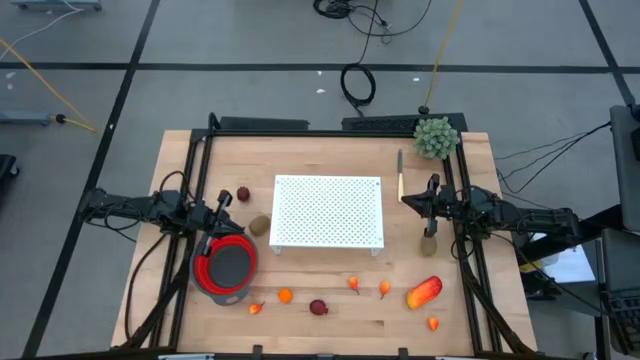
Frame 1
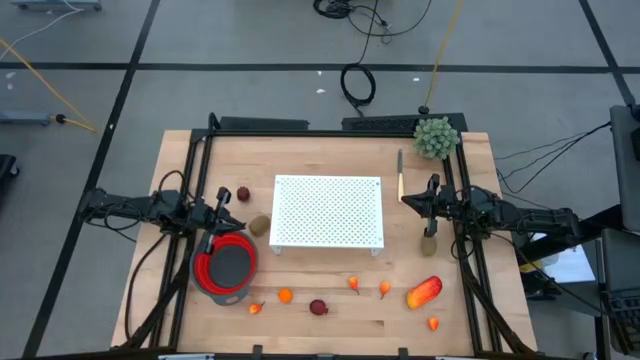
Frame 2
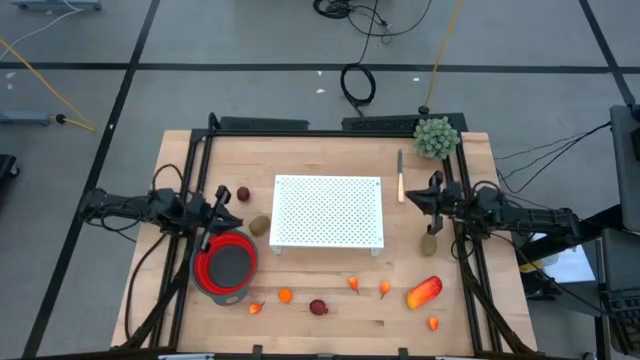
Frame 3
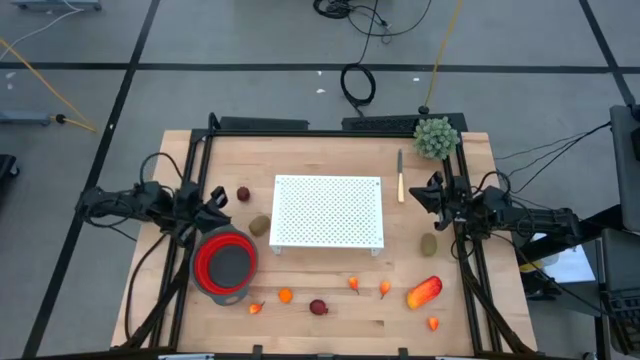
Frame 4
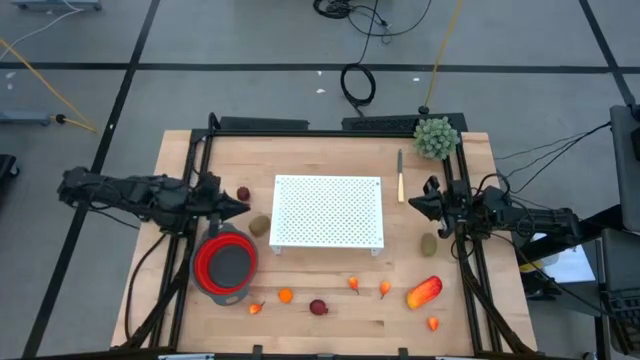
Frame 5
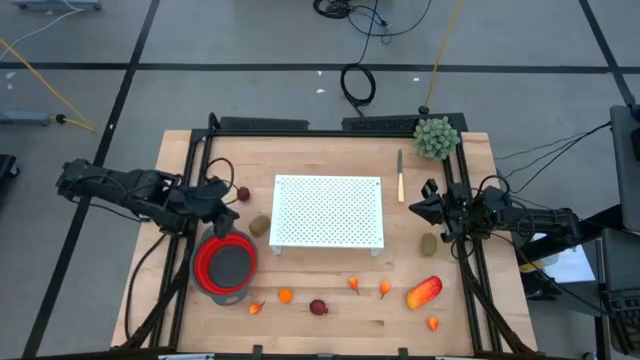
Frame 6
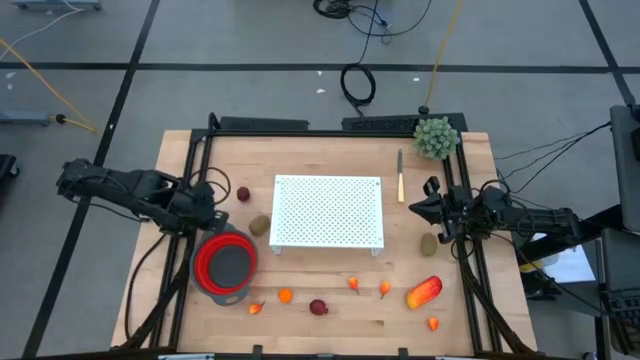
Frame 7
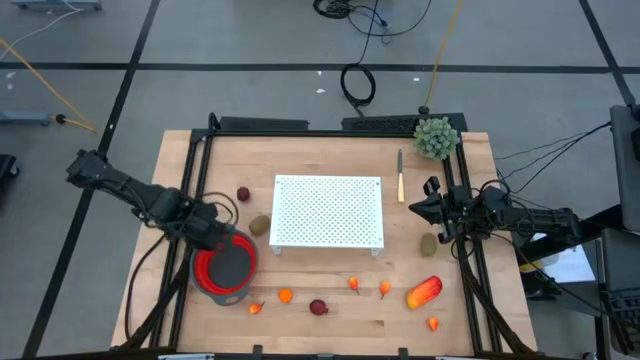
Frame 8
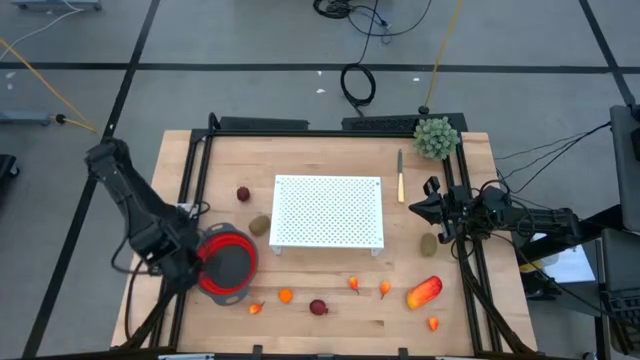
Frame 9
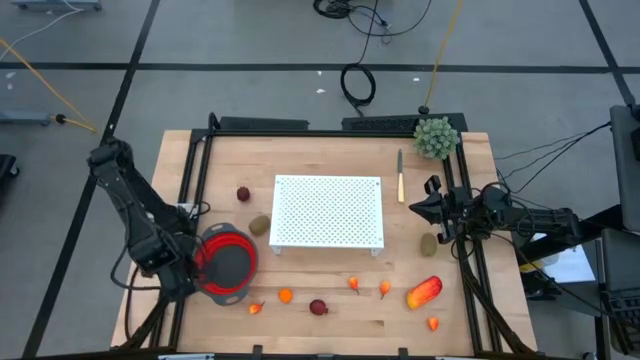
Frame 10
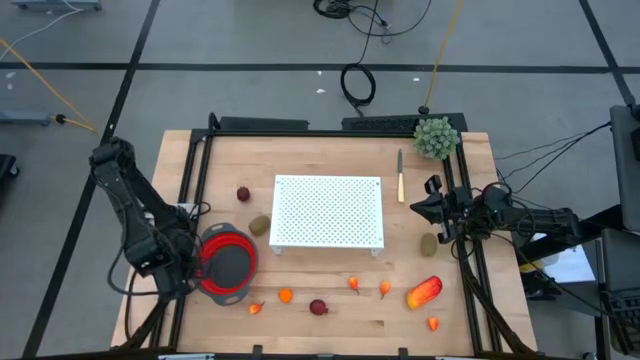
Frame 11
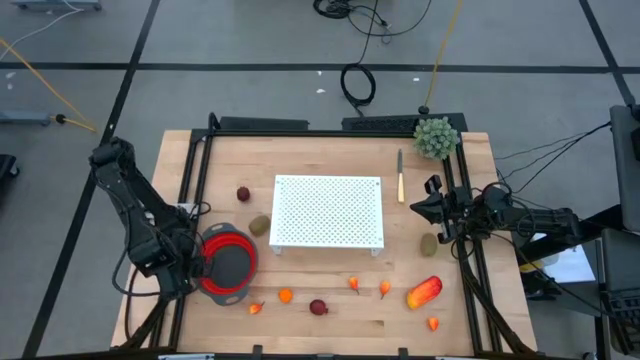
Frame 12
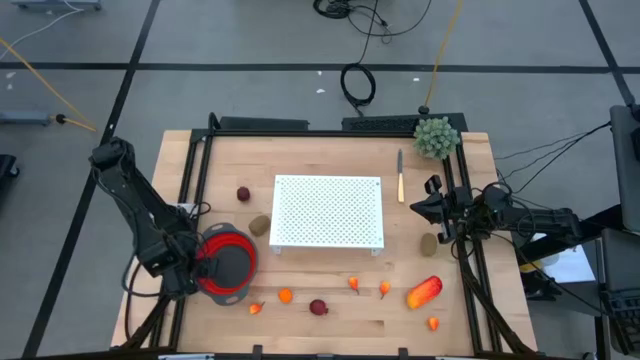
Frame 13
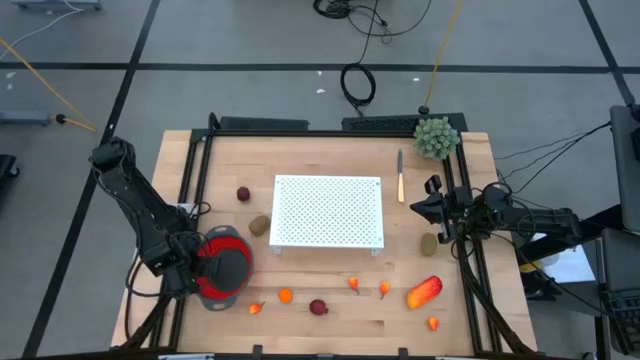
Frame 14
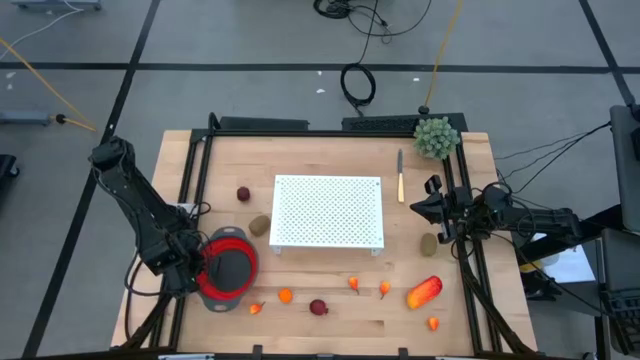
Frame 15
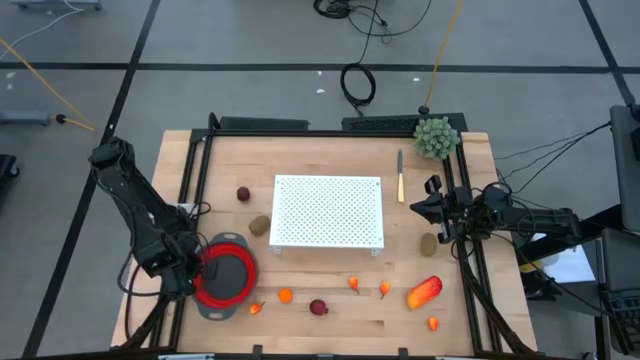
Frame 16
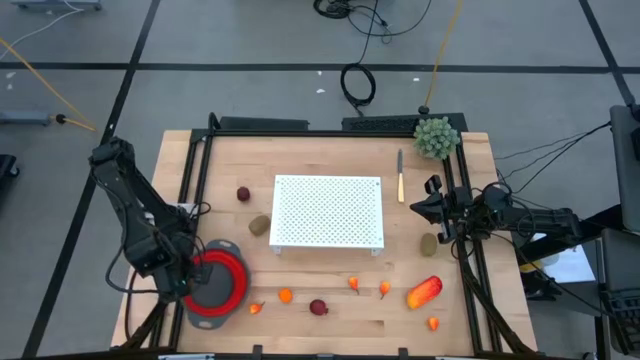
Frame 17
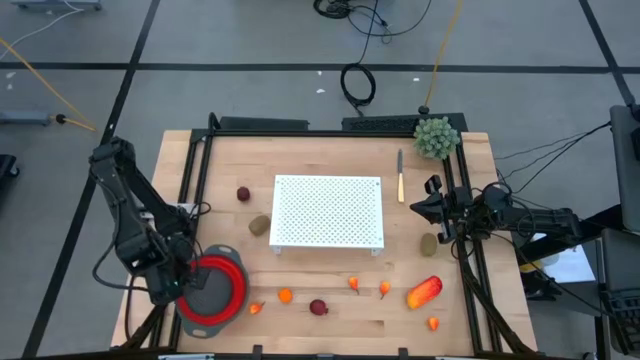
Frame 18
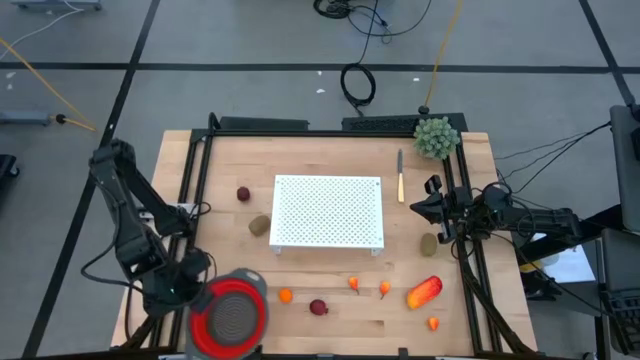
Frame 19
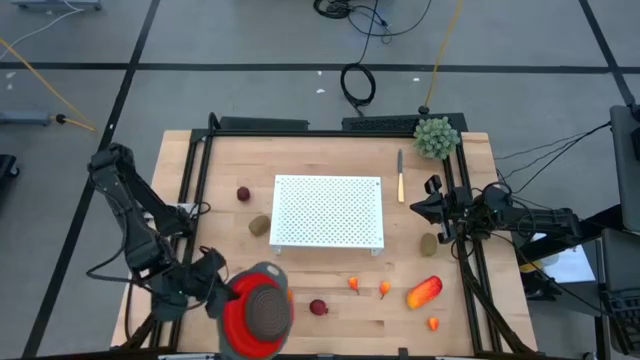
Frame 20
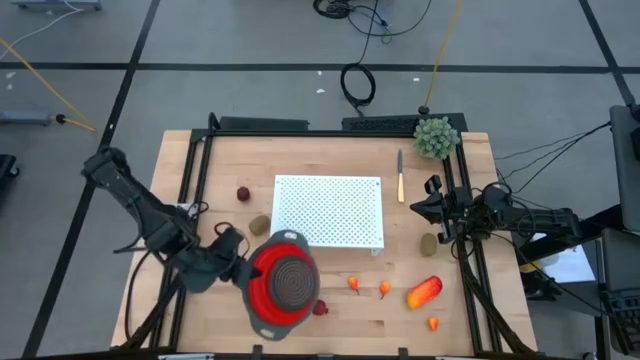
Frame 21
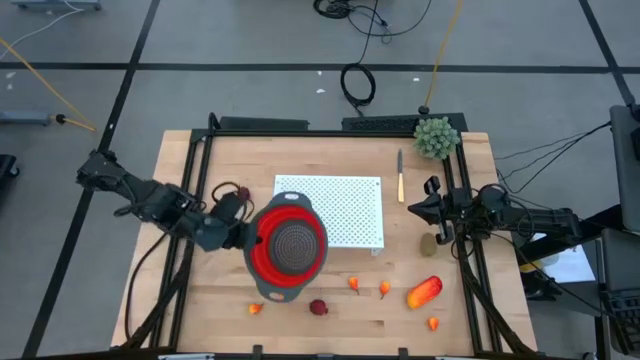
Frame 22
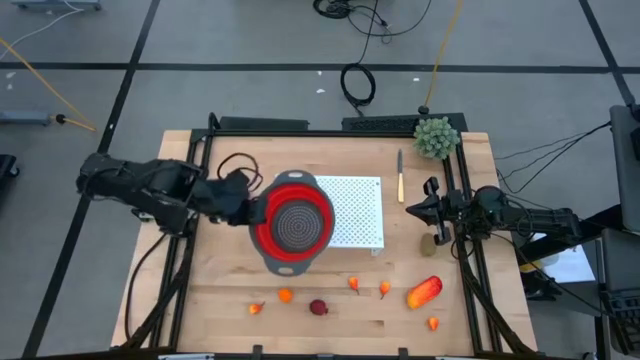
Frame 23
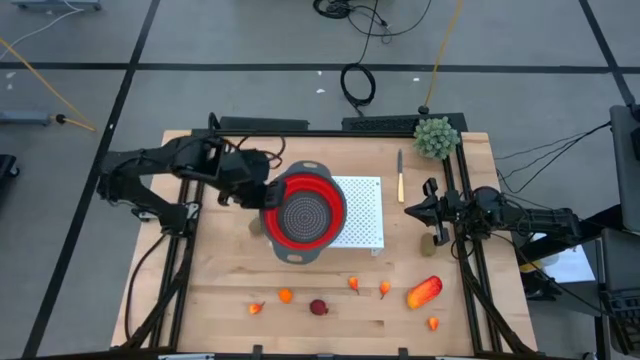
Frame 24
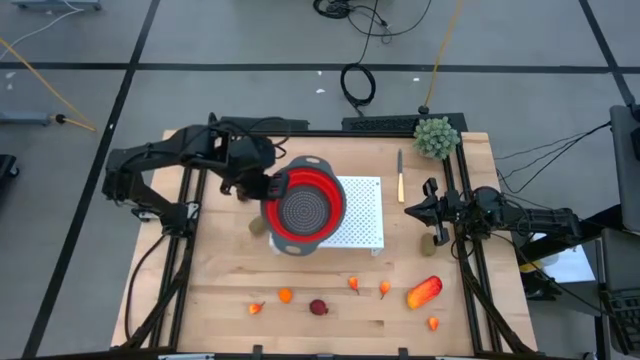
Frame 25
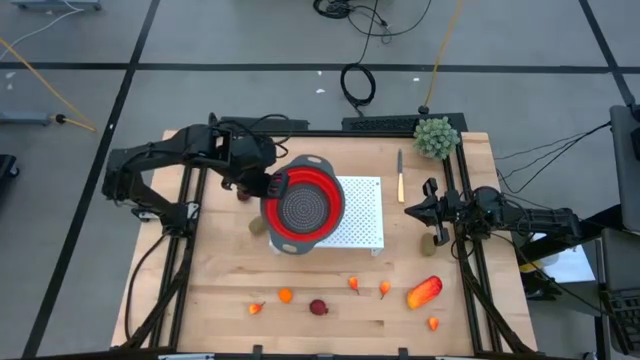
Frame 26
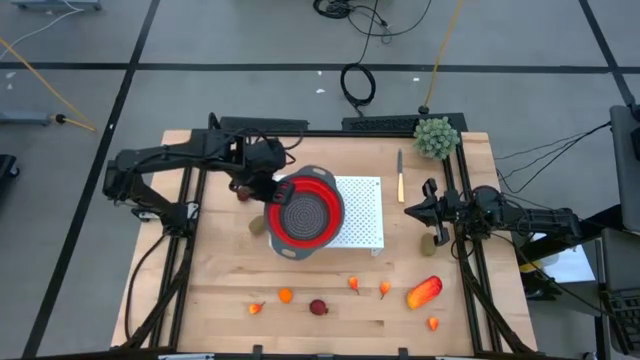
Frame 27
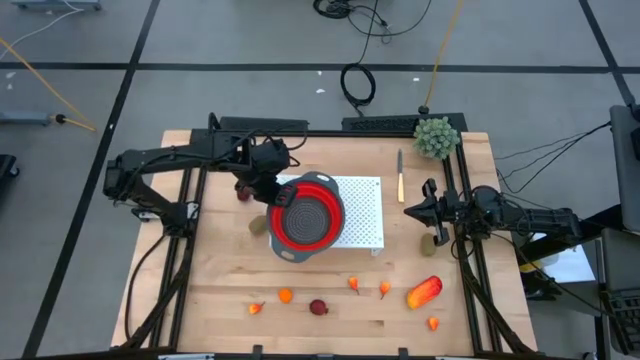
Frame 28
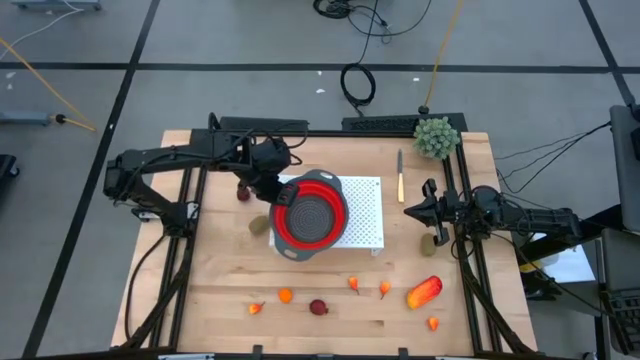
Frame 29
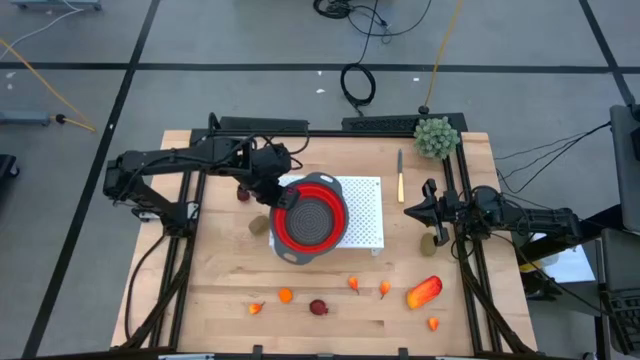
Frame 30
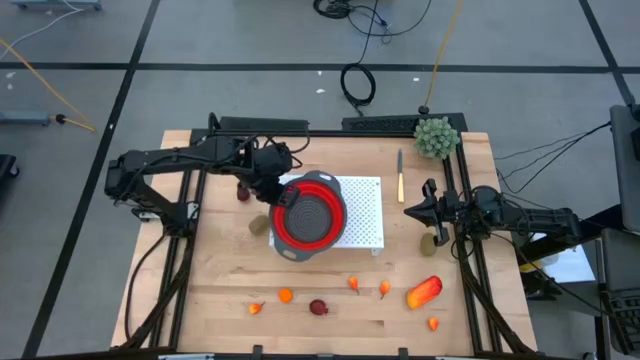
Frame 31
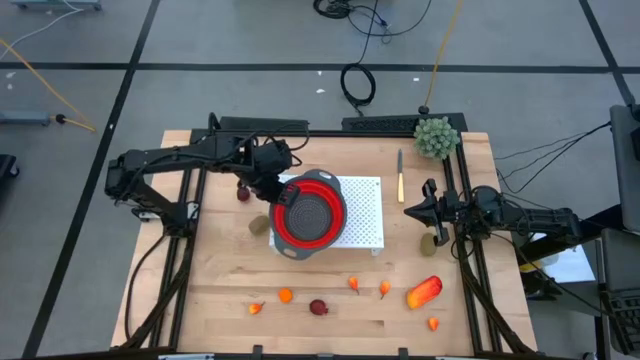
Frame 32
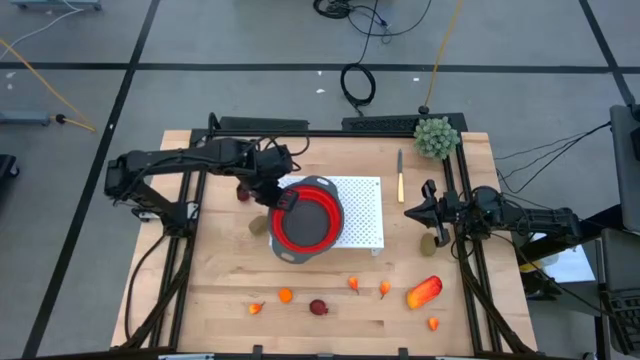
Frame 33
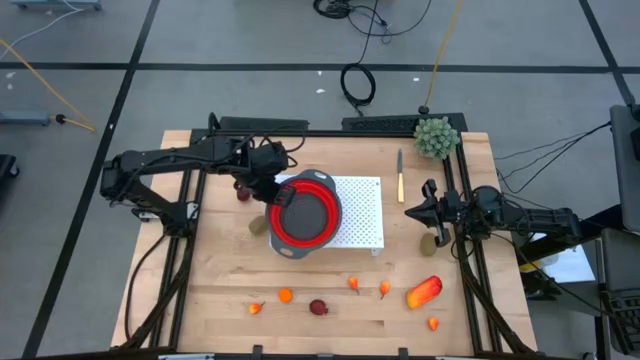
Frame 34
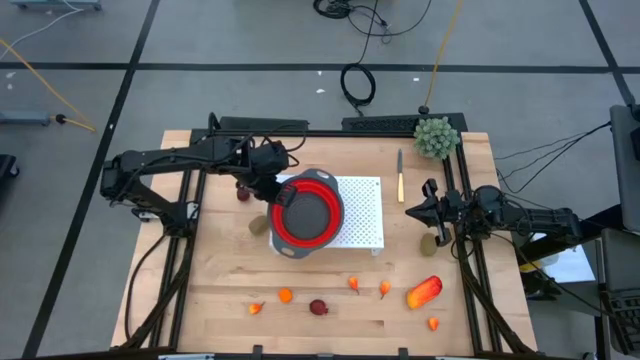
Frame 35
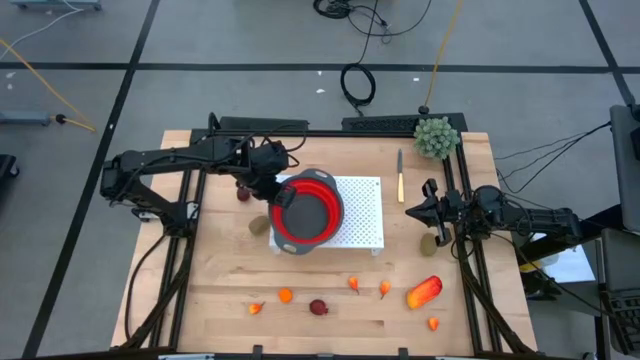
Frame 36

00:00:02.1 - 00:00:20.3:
Task: Pick & Place Fruit
Put the strainer bowl on the shelf
